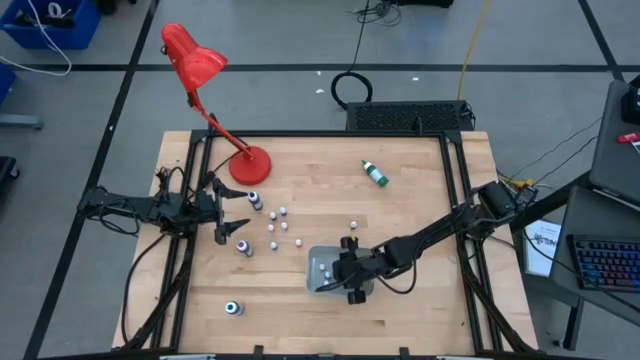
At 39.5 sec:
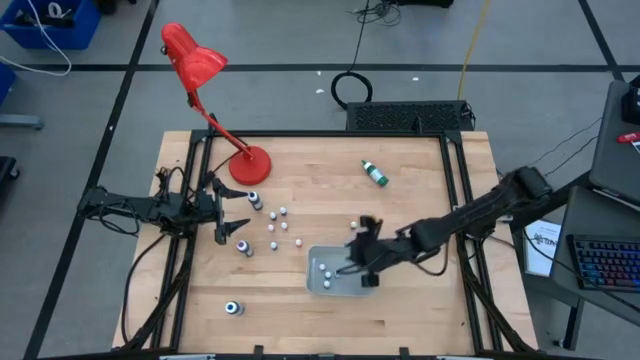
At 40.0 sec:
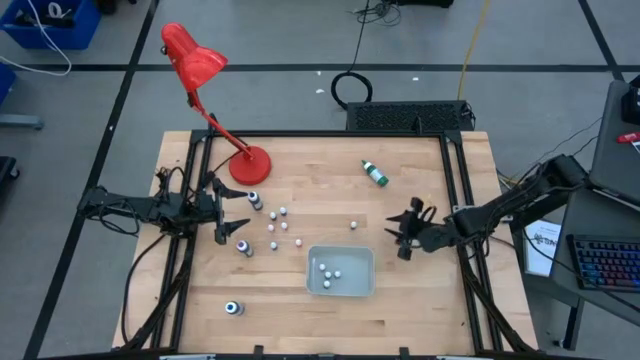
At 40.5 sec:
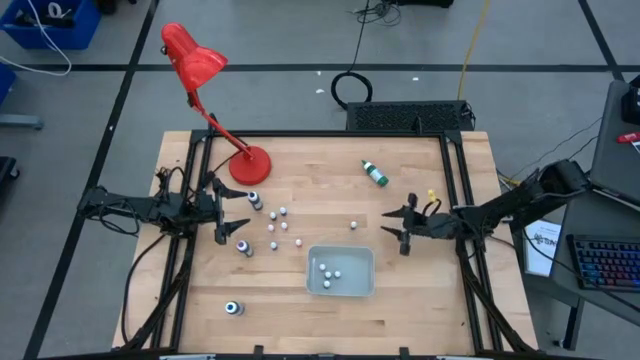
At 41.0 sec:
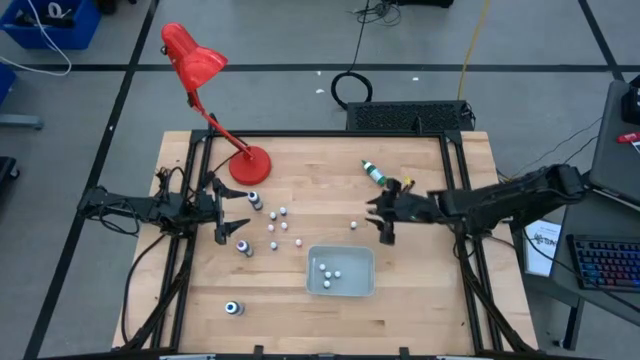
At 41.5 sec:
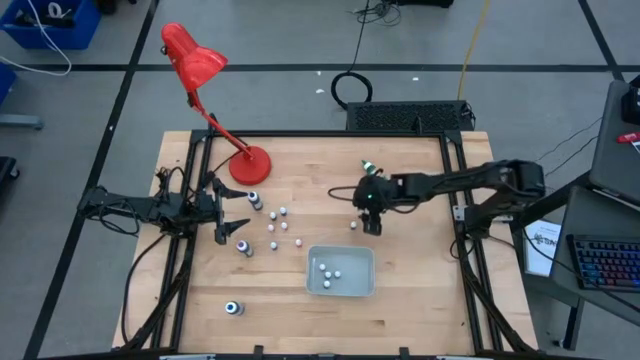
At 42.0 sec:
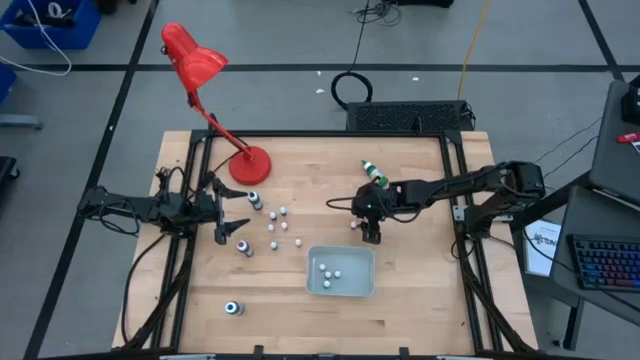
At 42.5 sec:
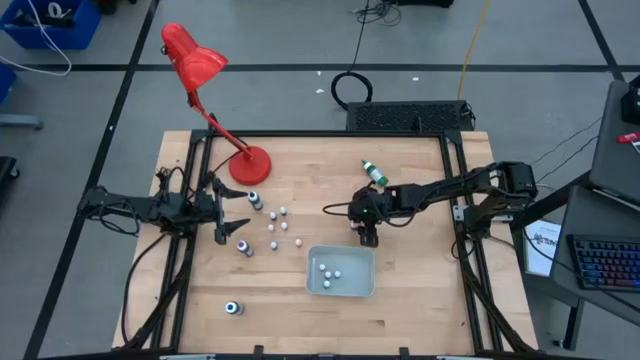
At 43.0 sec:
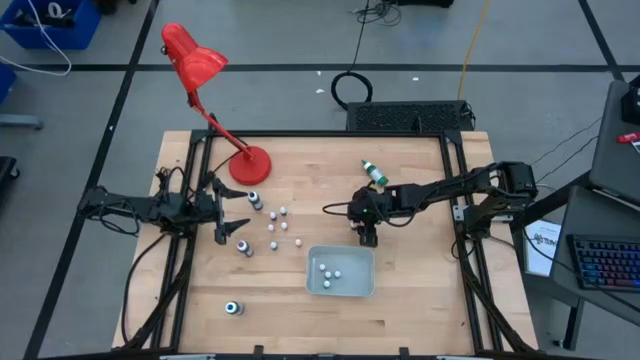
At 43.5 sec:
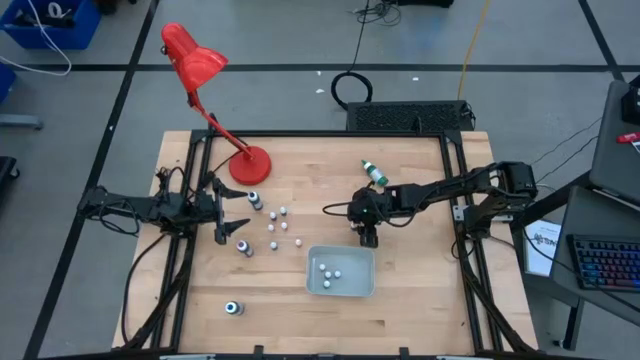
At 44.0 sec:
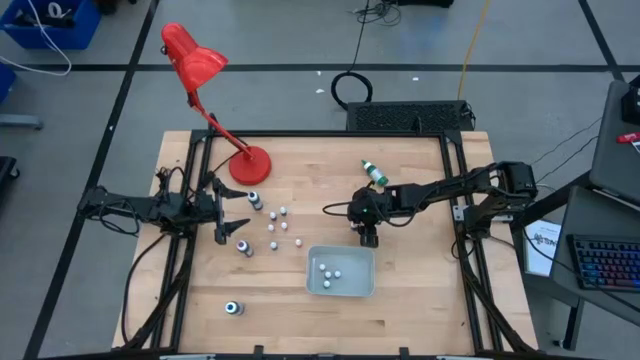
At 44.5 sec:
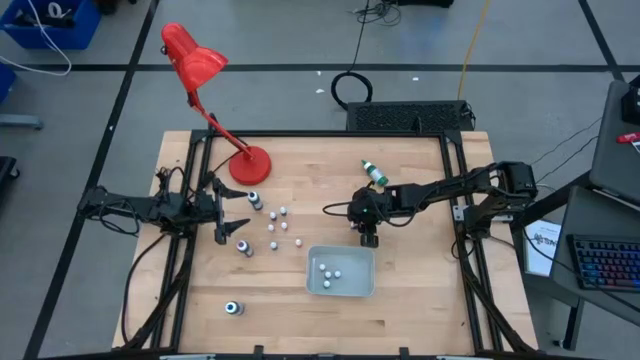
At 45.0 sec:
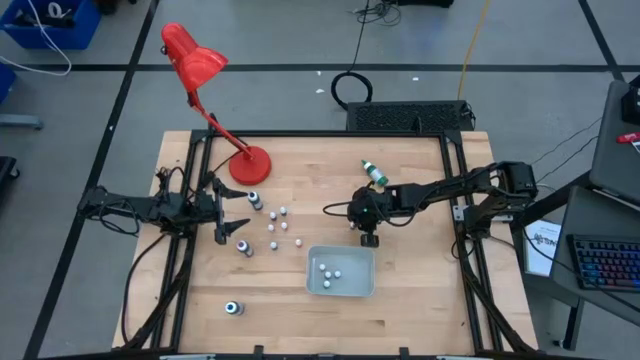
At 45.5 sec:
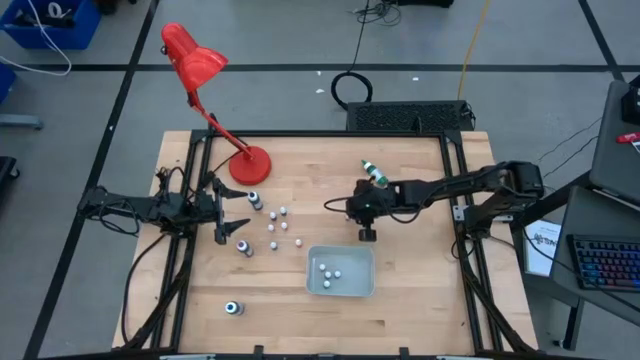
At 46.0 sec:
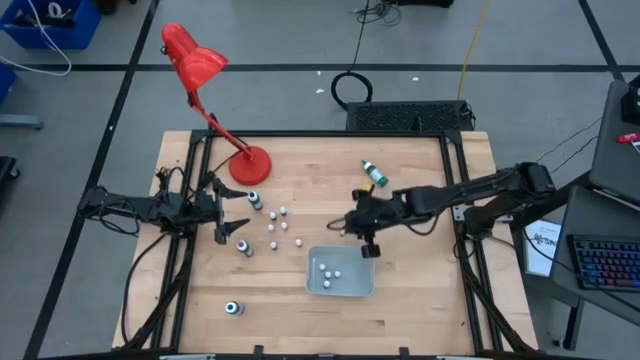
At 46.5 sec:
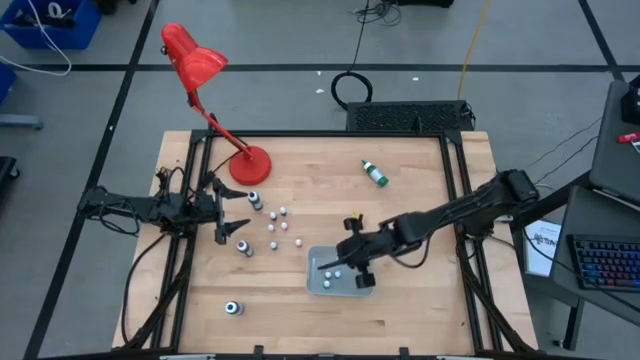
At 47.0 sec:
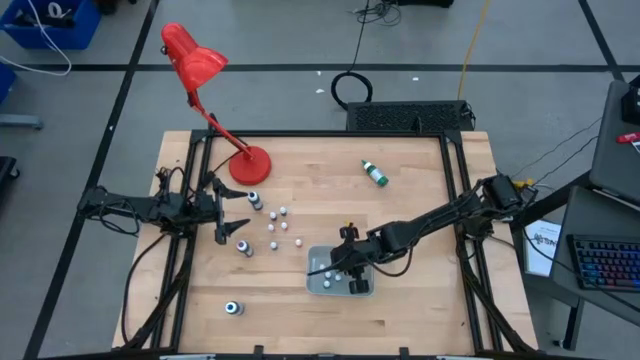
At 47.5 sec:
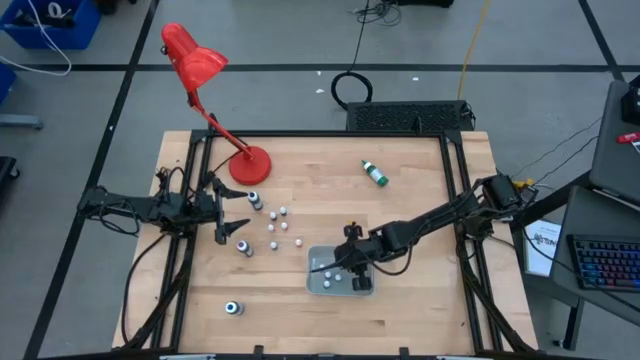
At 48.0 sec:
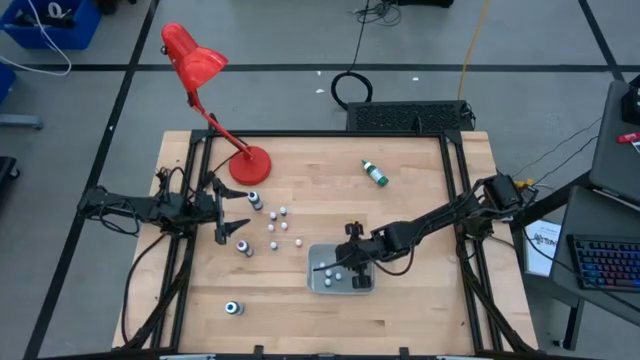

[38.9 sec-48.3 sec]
Task: Pick & Place food coloring
Put the small red food coloring bottle into the gray bin

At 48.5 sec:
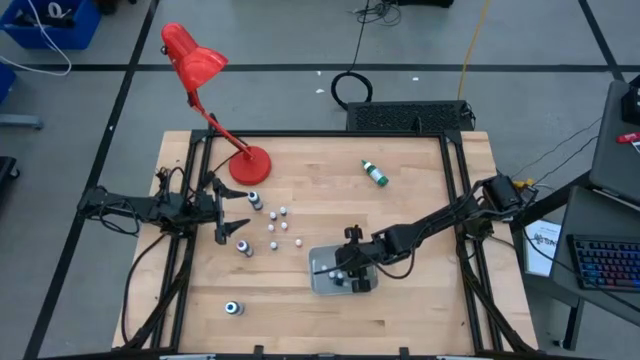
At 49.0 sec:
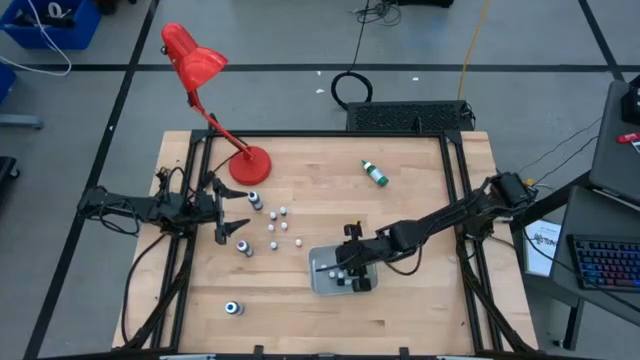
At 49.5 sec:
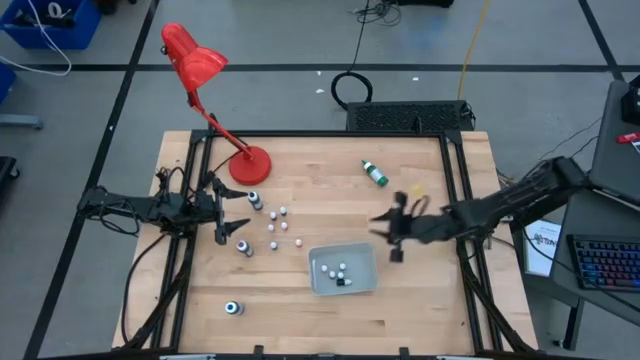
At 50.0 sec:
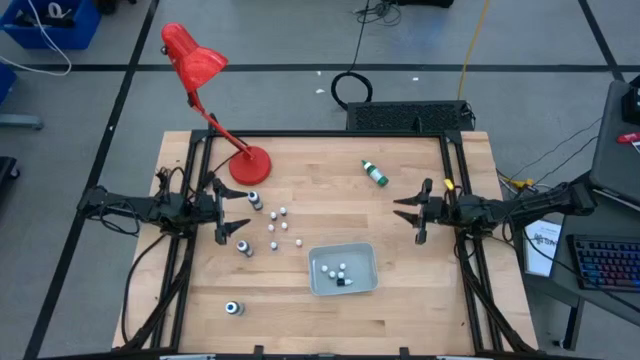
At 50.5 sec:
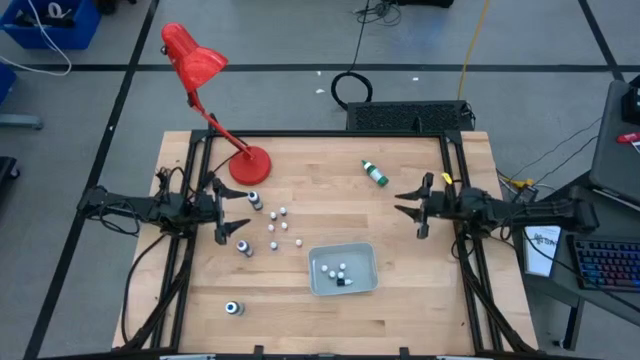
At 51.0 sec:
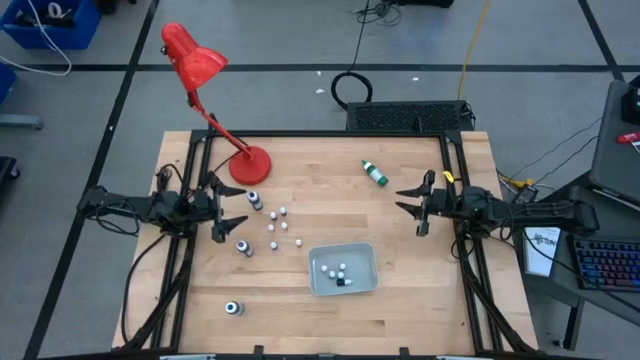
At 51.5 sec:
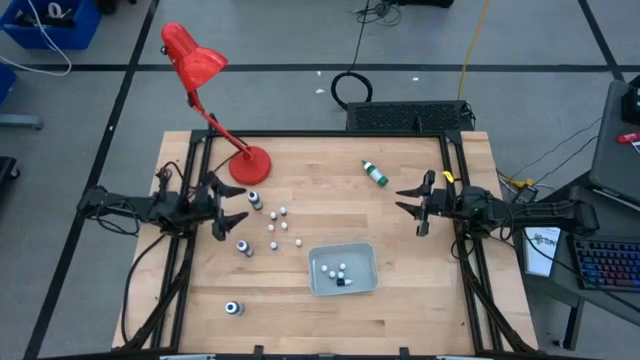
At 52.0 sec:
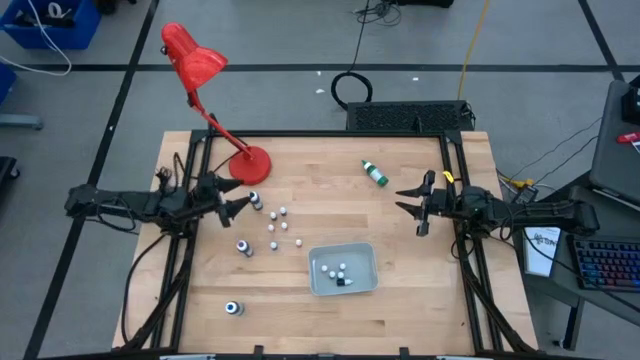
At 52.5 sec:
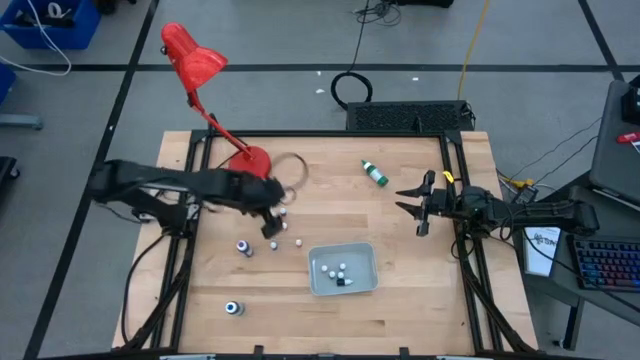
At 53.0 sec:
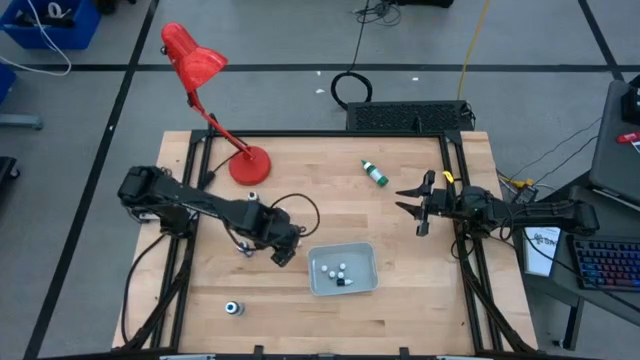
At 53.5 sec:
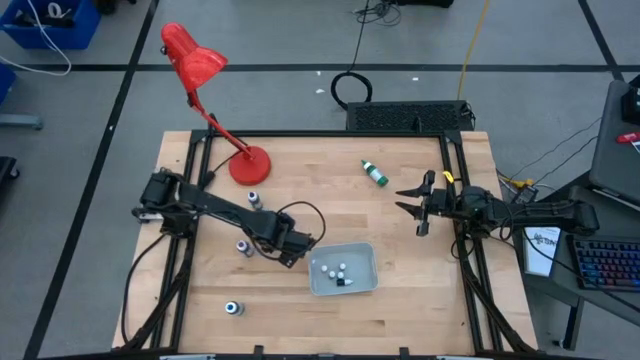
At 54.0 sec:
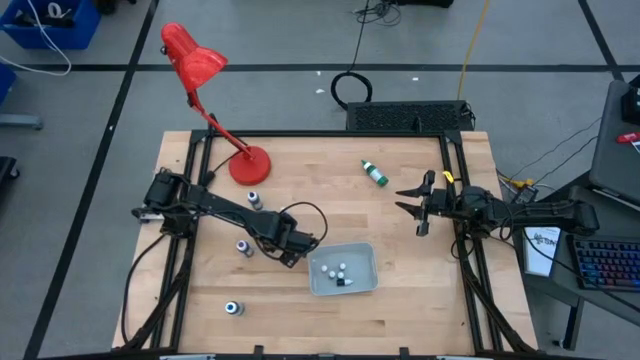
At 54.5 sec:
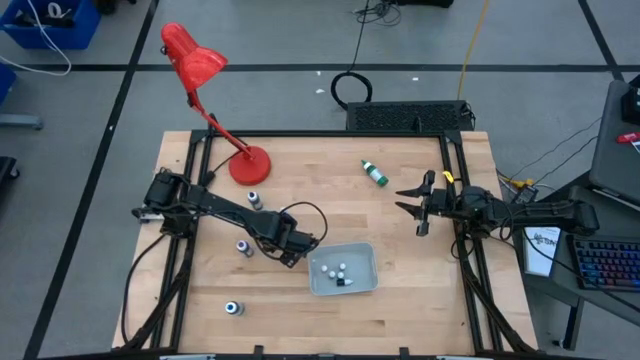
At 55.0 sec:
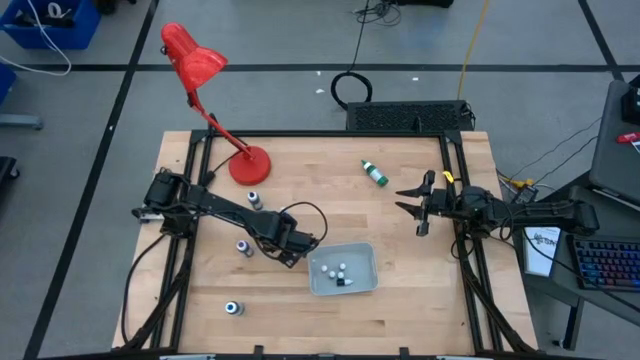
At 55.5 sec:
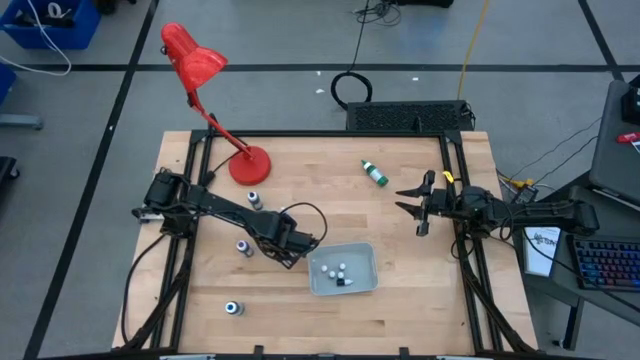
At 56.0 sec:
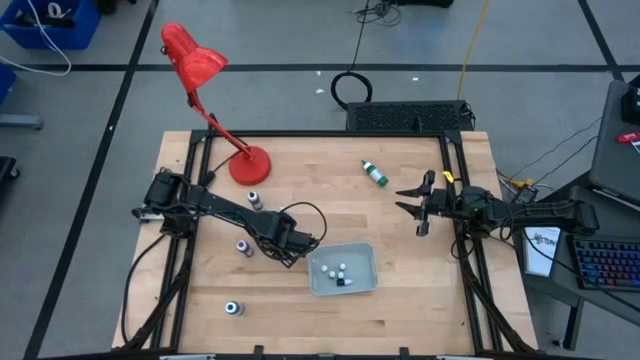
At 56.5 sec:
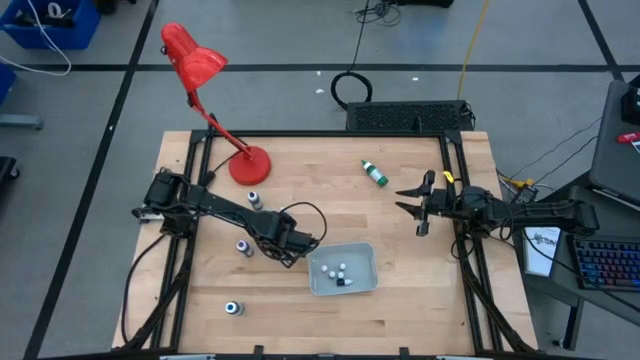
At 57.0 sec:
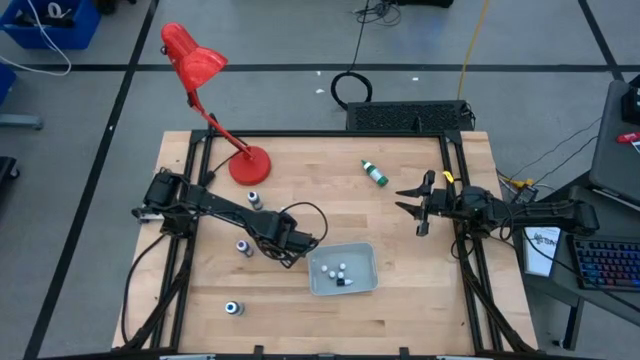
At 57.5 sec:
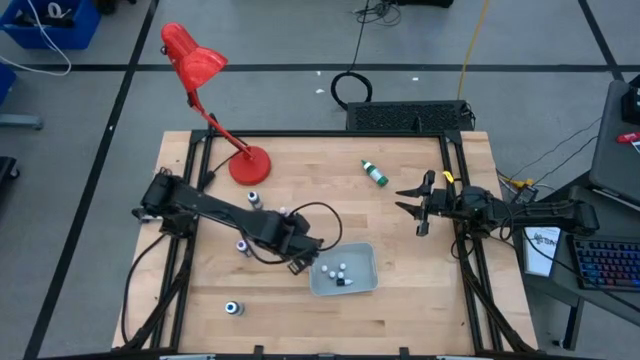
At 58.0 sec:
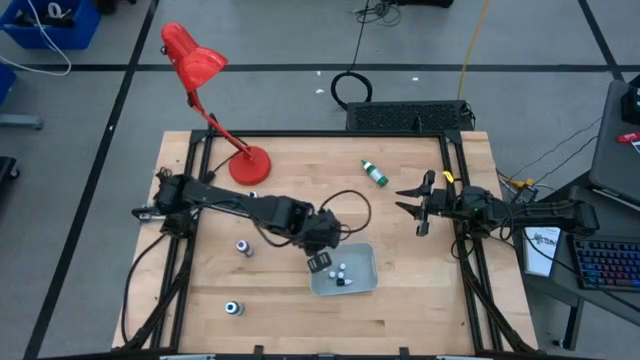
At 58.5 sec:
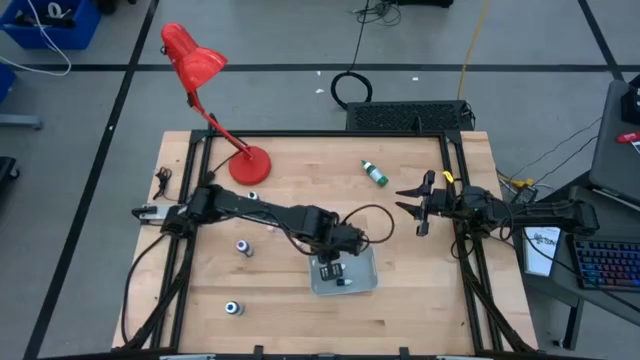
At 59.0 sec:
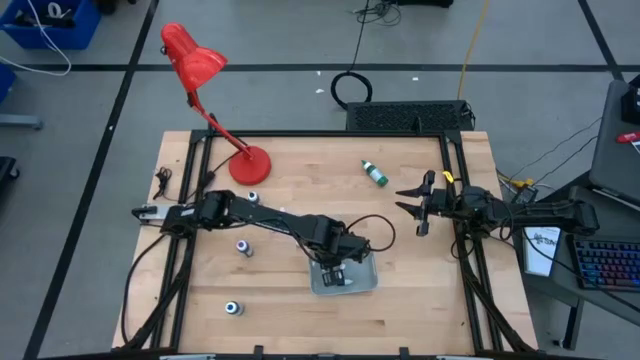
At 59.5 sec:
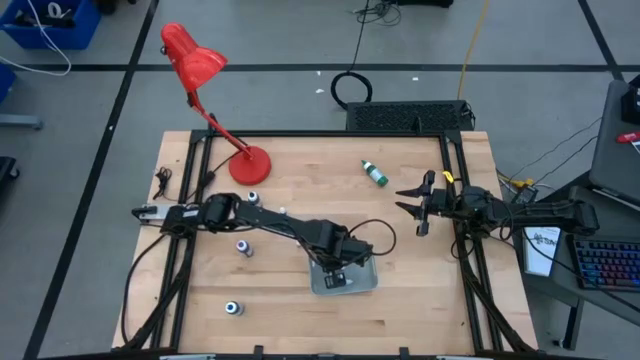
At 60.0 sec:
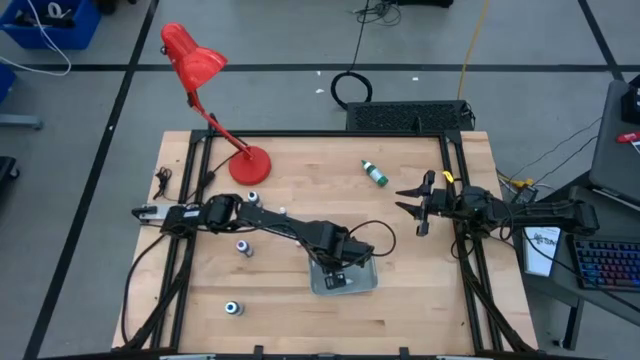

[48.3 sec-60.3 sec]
Put the small dark blue food coloring bottle into the gray bin
